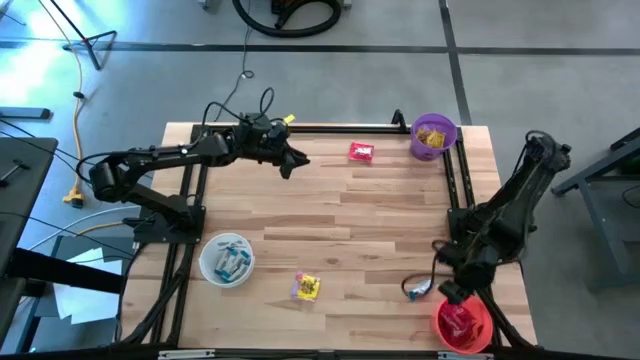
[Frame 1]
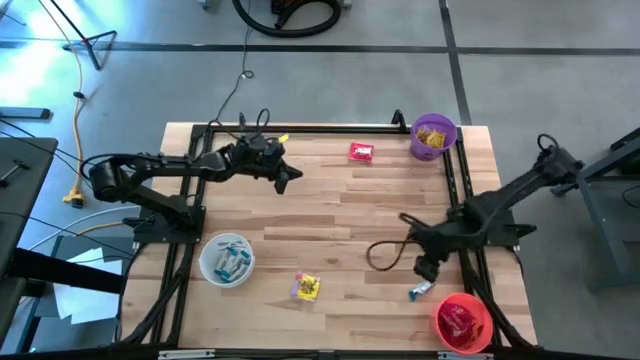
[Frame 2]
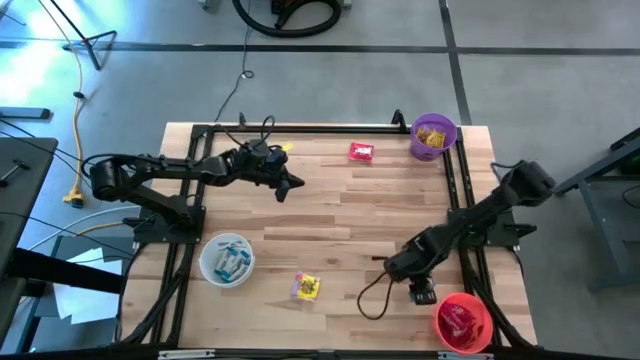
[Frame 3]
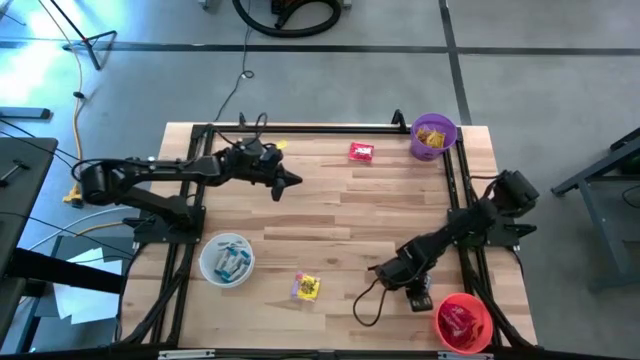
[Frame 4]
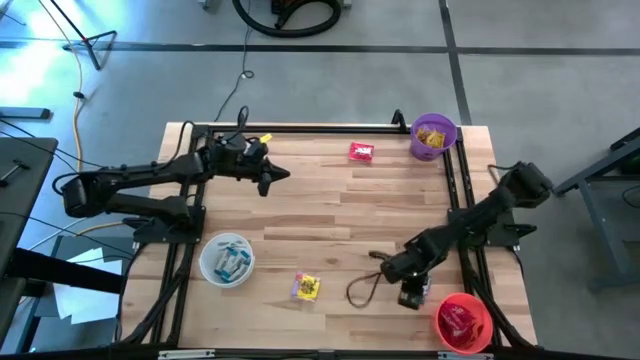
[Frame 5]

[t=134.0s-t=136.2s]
Task: Sort candy
Put the white chocolate bar into the white bin

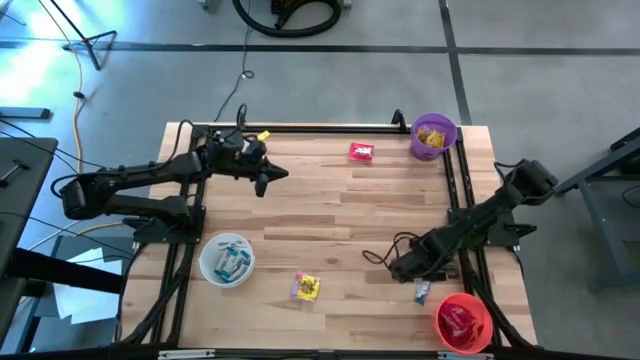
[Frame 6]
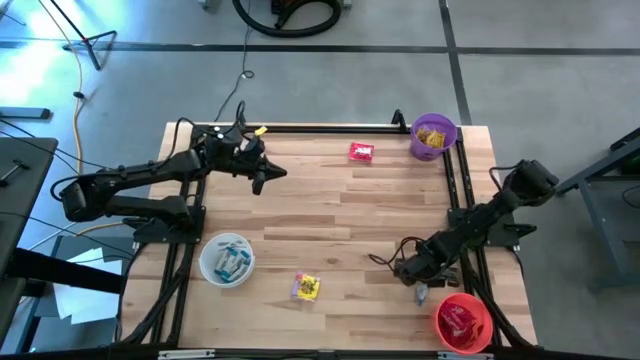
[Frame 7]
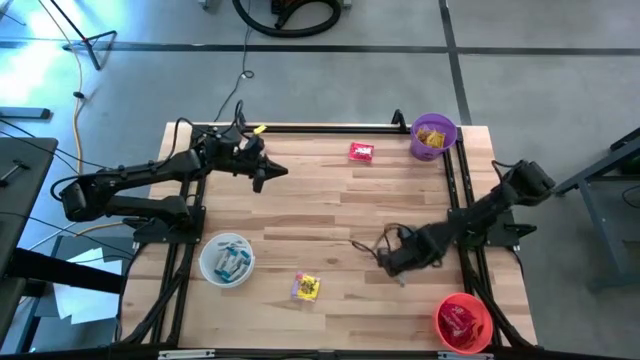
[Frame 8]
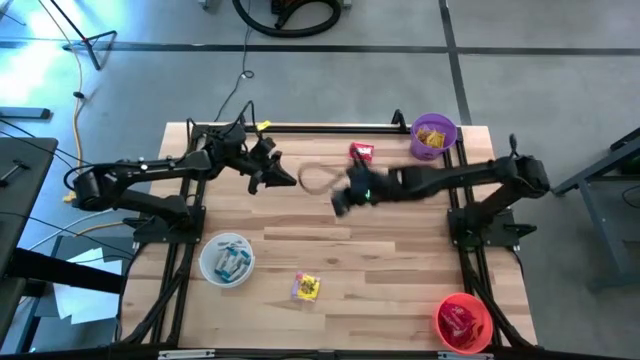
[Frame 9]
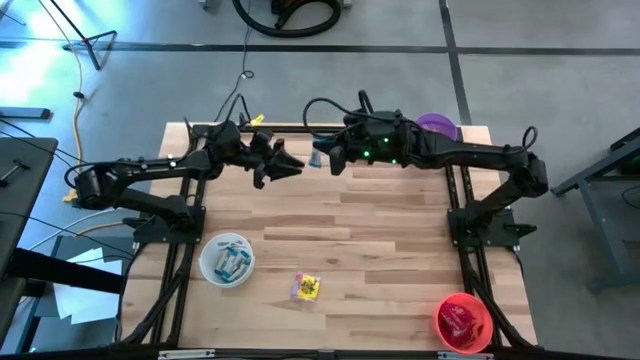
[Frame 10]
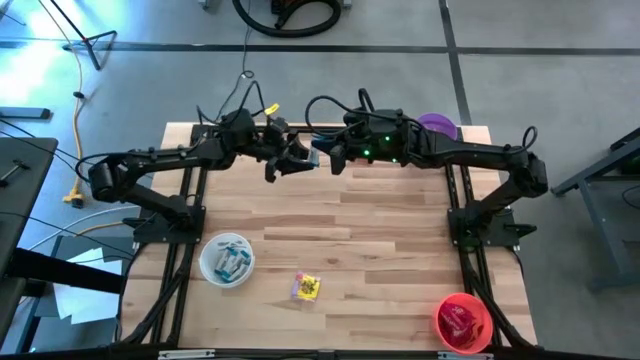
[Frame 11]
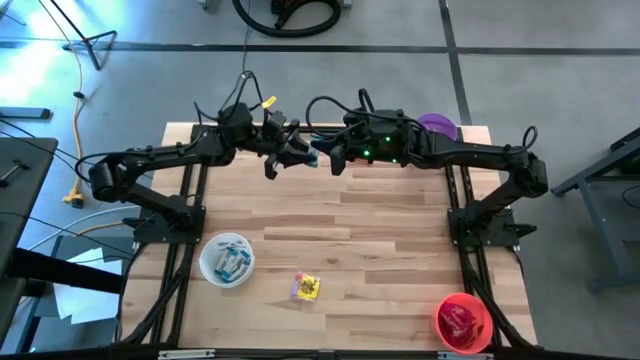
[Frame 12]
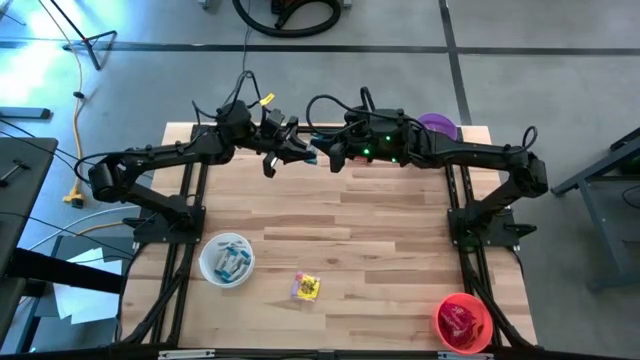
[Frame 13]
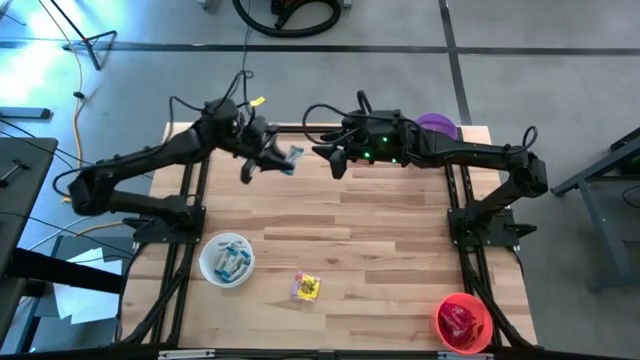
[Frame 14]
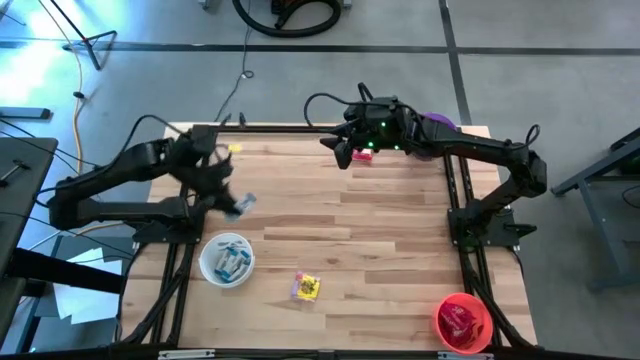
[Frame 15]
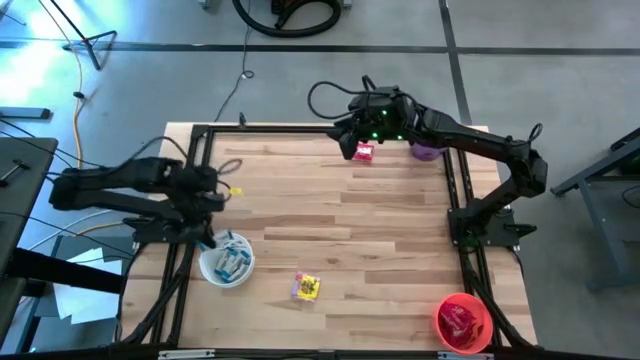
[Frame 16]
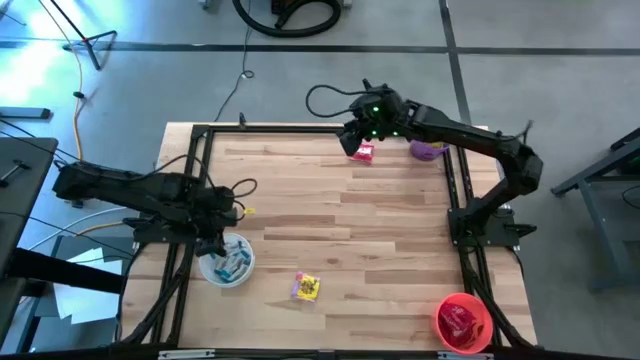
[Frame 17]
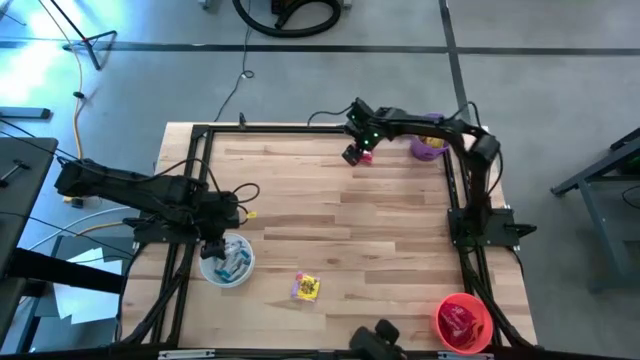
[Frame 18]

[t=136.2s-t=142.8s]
Put the white chocolate bar into the white bin

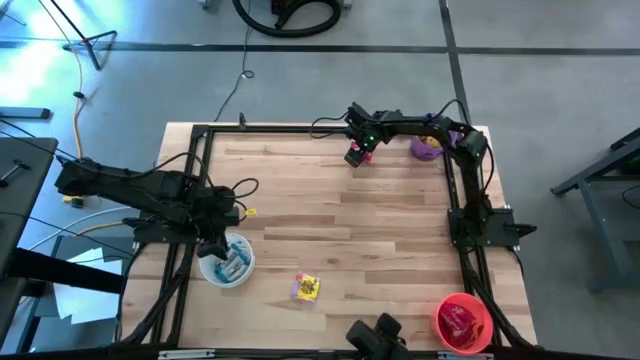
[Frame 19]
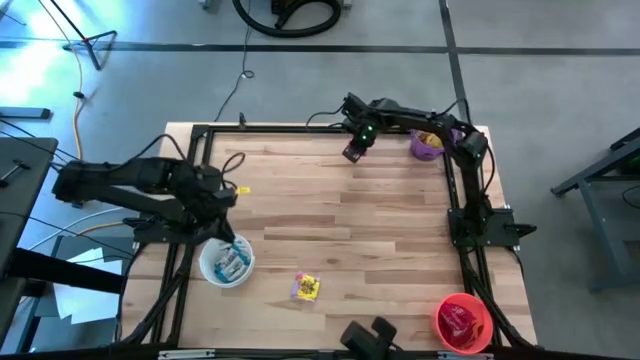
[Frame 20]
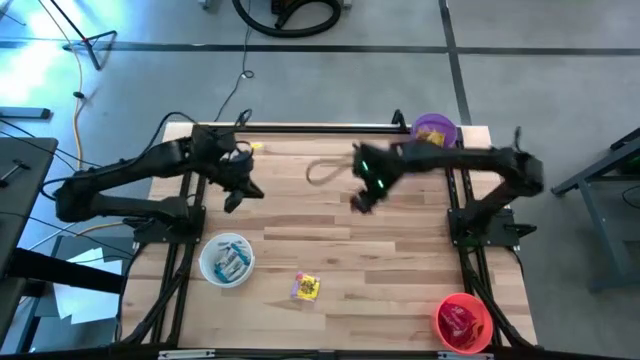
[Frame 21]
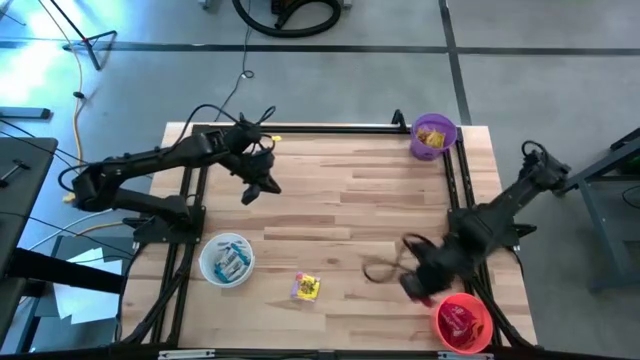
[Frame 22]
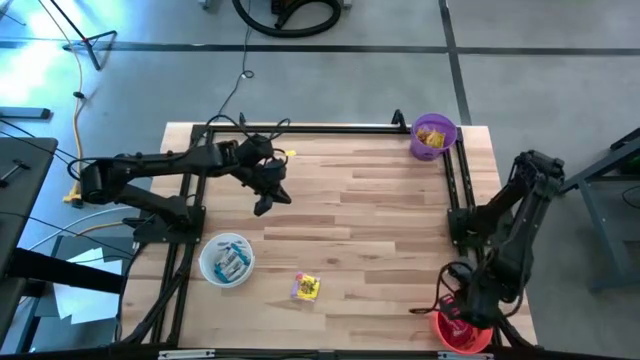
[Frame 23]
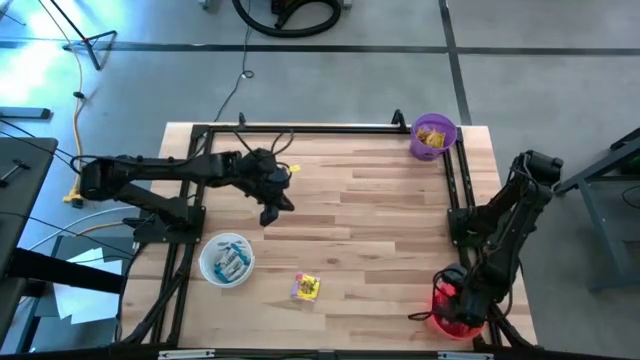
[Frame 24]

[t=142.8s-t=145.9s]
Put the red candy into the orange bin

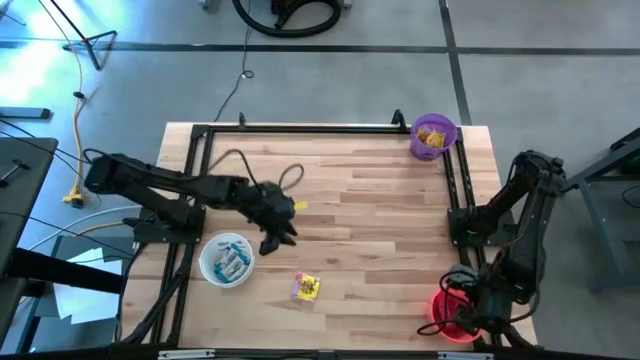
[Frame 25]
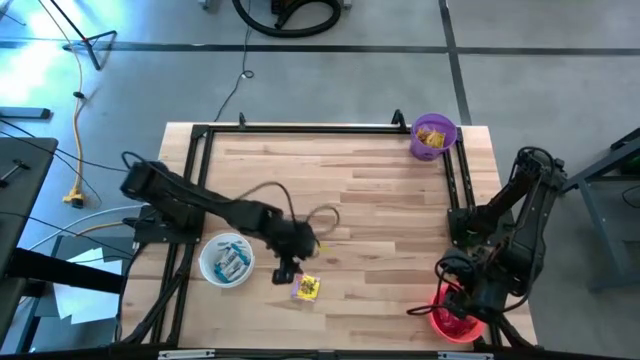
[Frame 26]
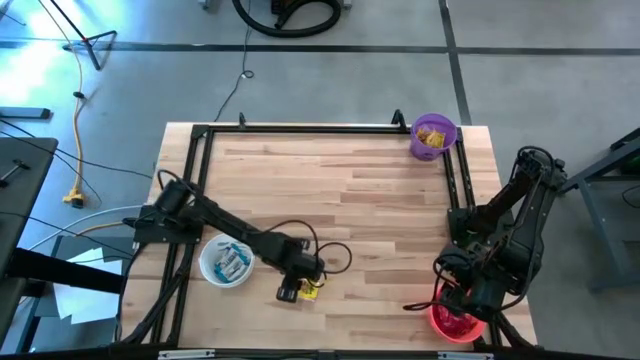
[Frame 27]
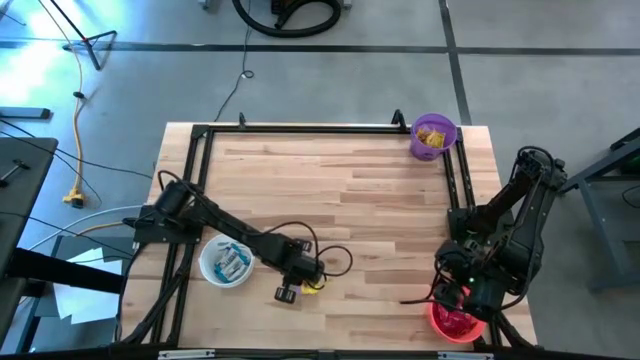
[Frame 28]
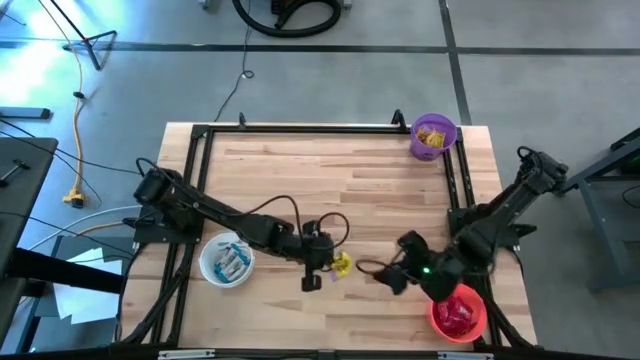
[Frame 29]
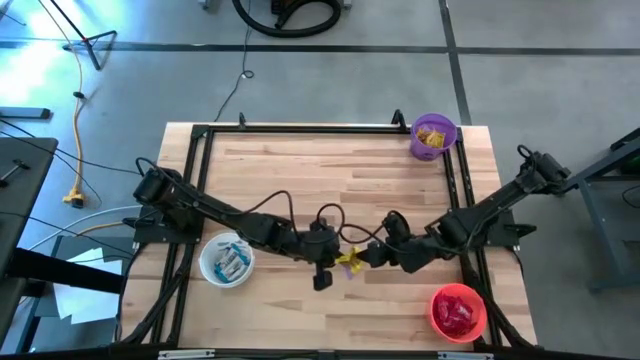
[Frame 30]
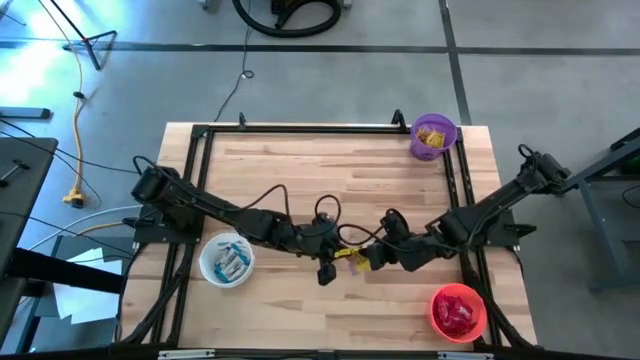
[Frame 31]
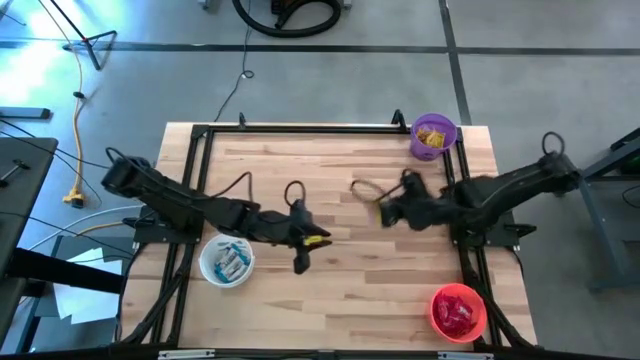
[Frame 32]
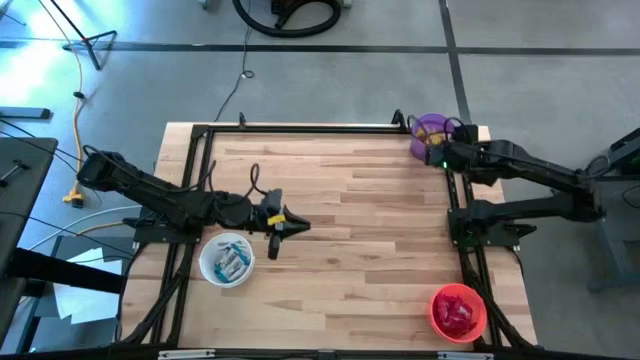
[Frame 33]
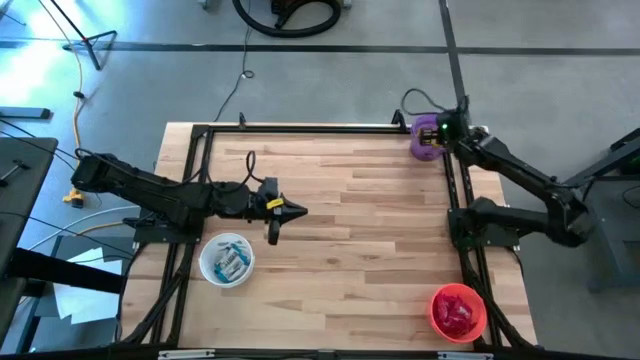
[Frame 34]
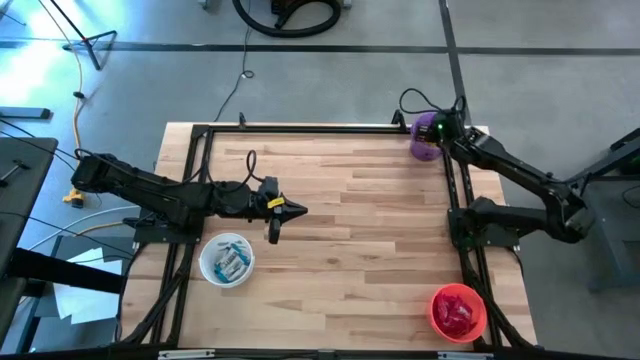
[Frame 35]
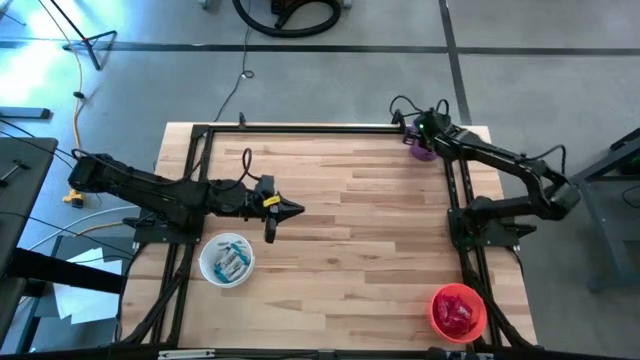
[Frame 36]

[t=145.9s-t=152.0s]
Put the yellow candy into the purple bin

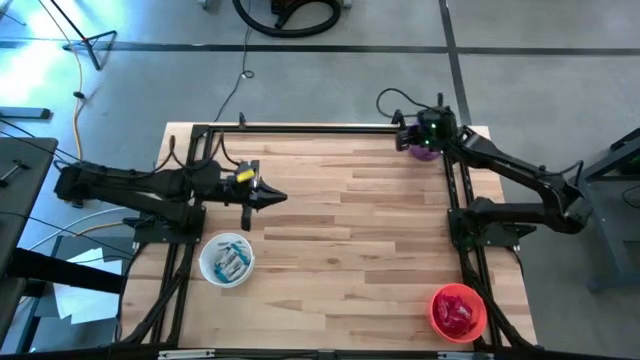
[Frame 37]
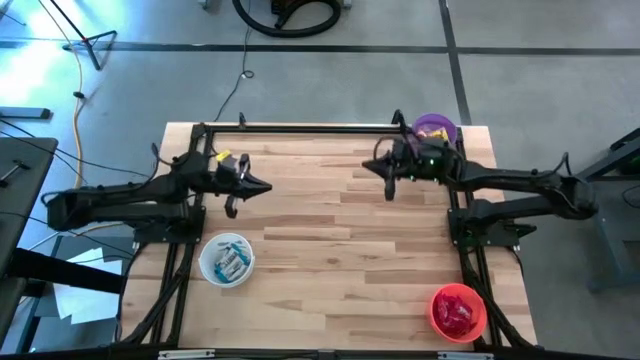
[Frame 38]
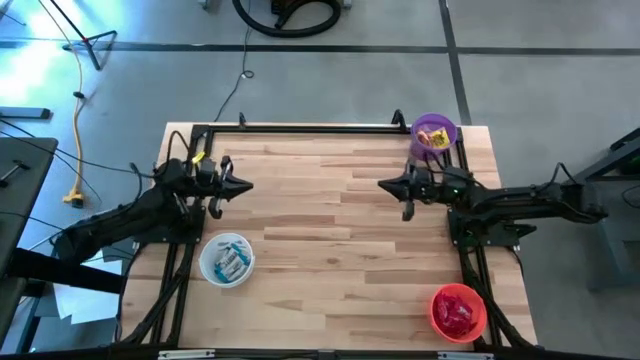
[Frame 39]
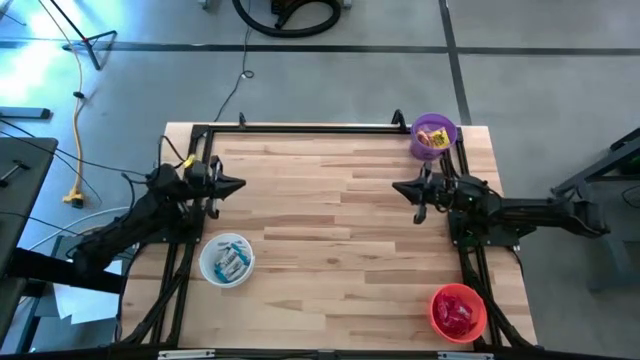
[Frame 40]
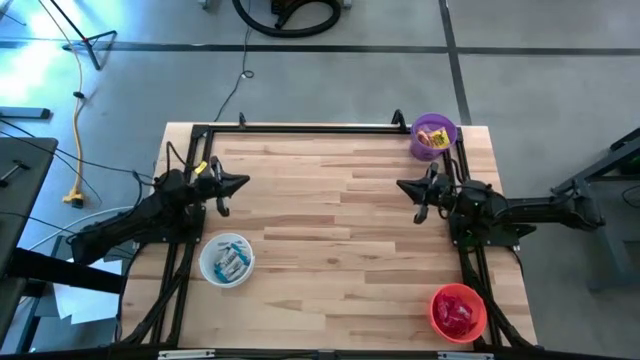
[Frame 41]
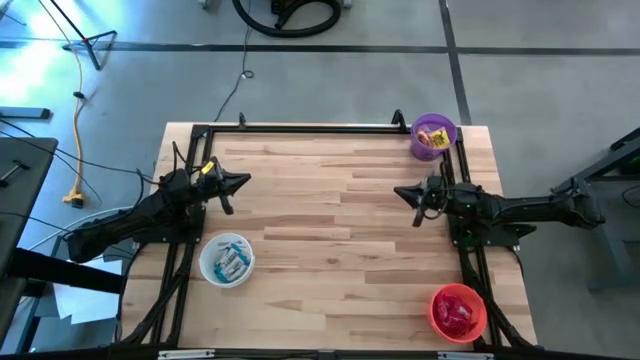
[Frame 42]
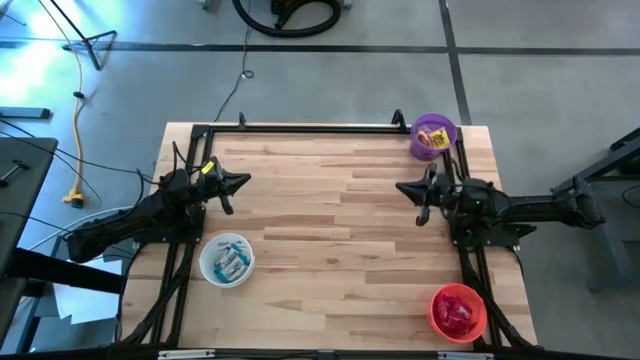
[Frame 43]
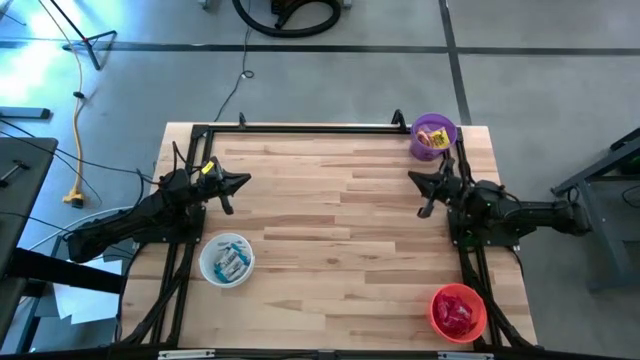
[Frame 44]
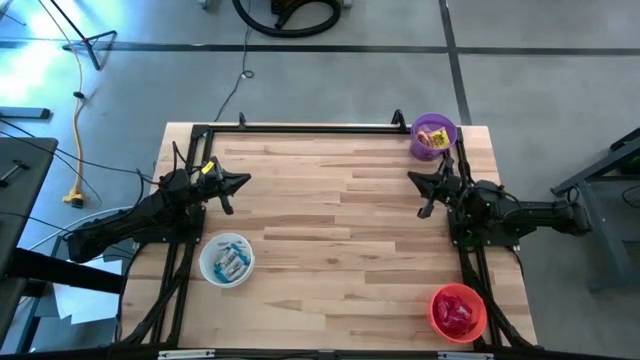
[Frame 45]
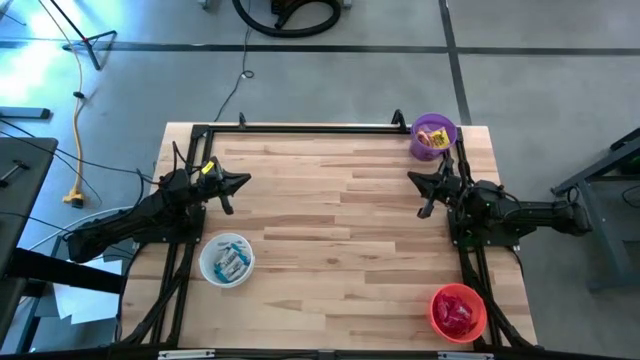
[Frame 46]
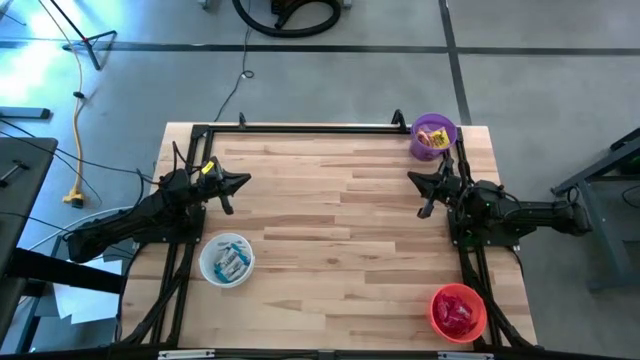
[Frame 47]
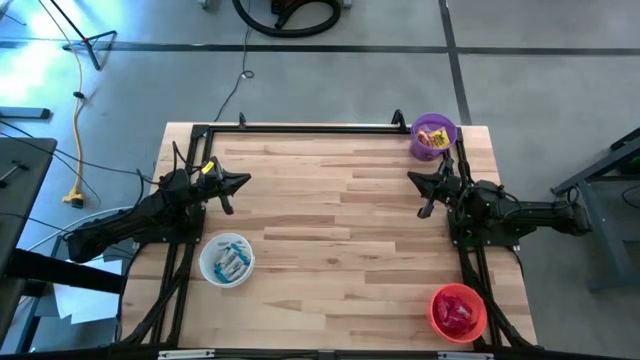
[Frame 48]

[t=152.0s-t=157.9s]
Return to Home Position
